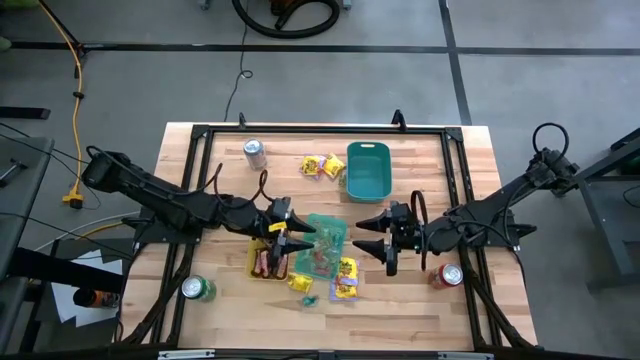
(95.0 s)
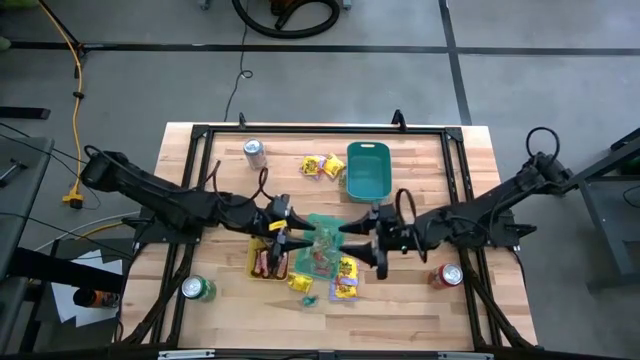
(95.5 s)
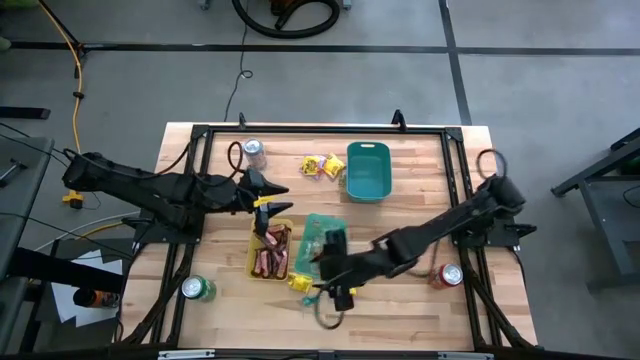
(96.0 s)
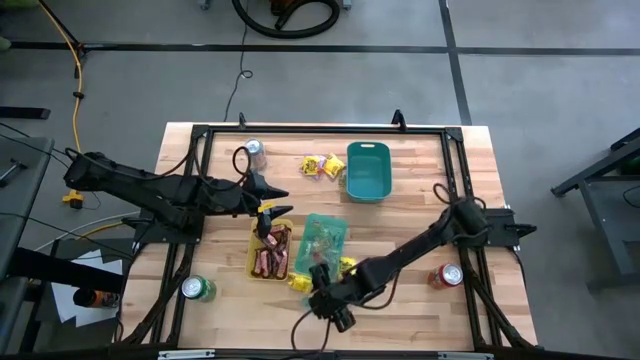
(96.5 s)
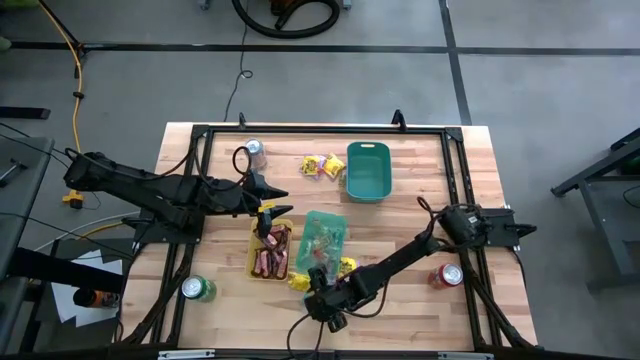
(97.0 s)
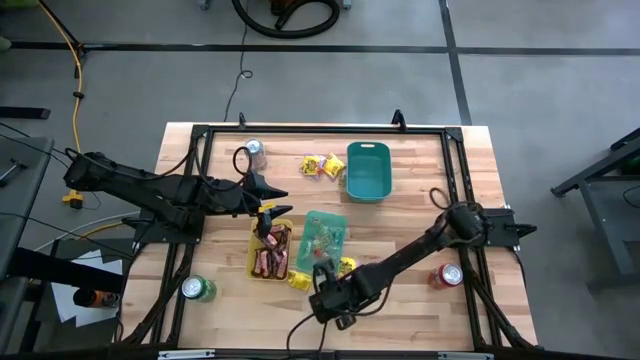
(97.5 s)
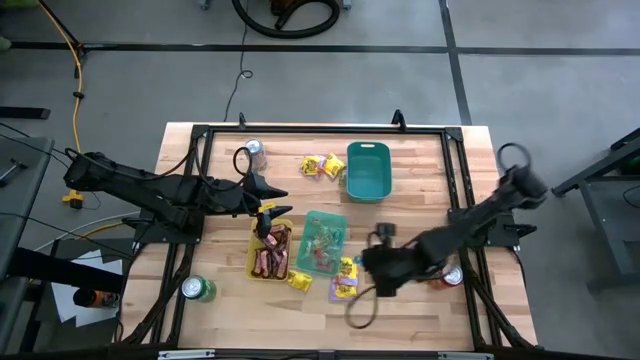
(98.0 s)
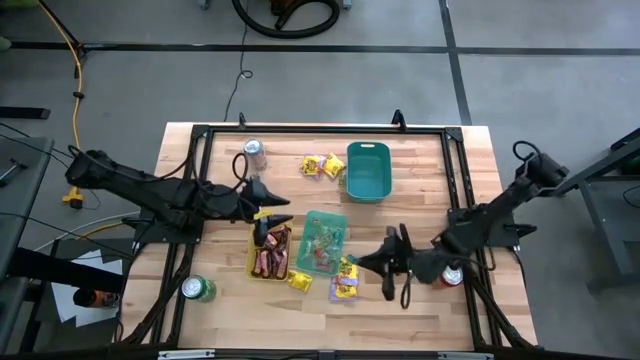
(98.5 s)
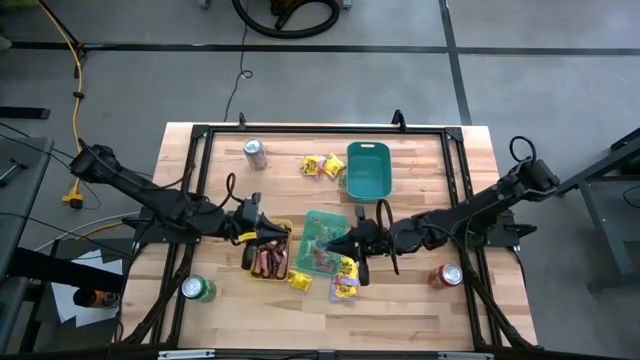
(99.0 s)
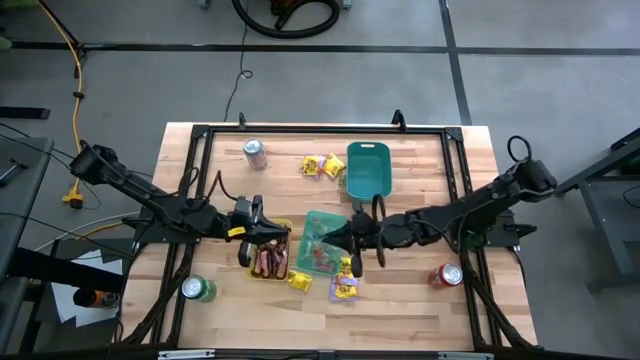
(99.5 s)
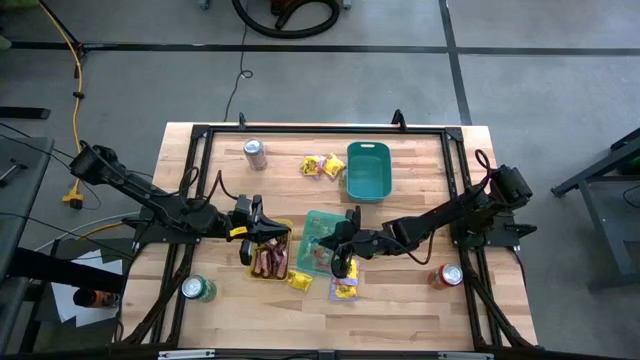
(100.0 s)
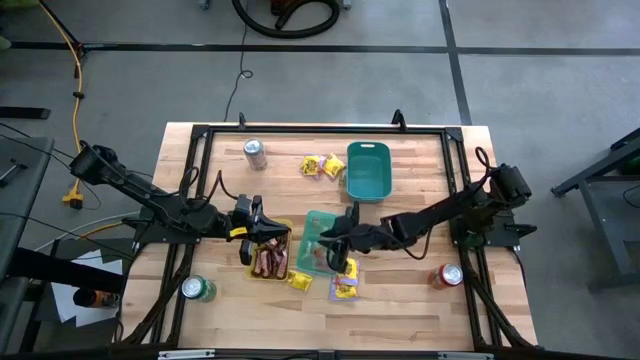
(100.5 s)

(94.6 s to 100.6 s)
Task: Sort candy
Put the blue gummy into the light blue bin

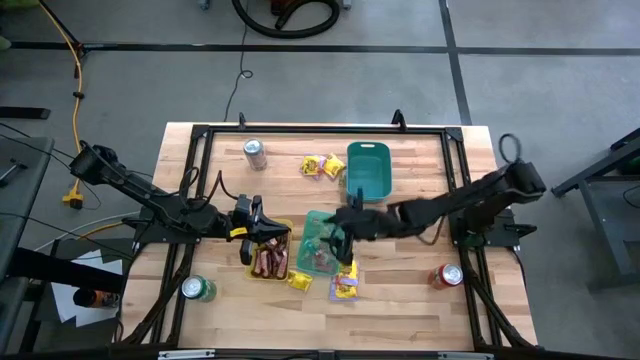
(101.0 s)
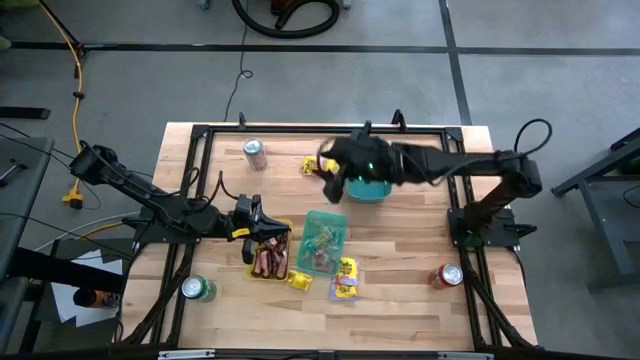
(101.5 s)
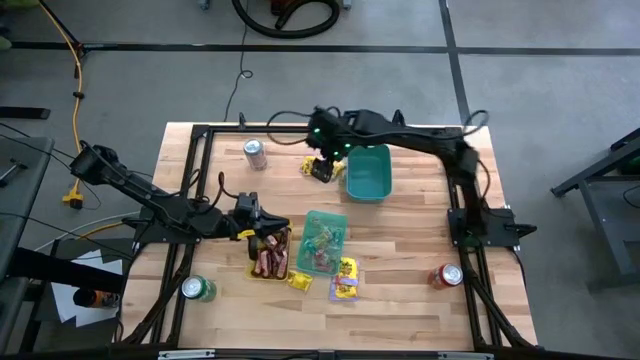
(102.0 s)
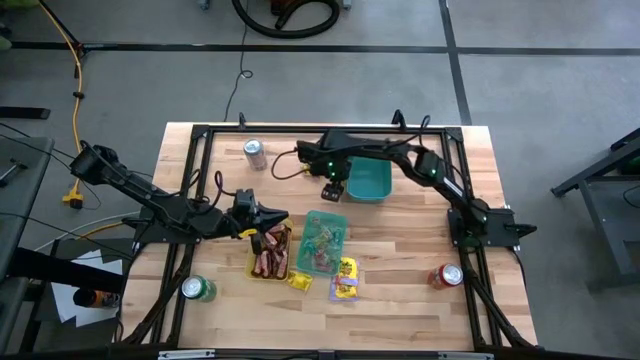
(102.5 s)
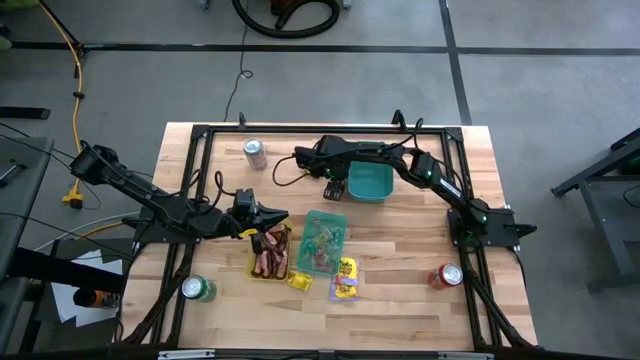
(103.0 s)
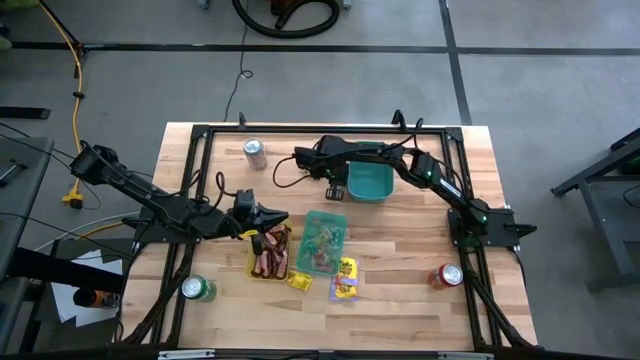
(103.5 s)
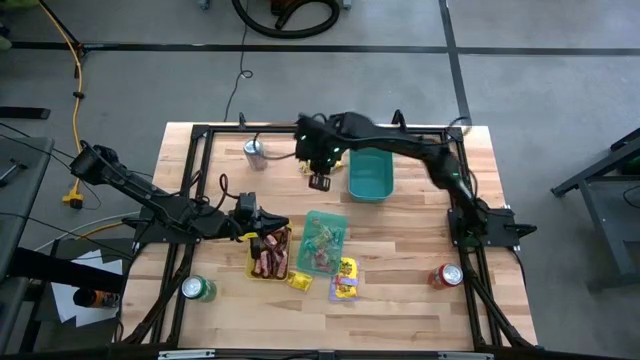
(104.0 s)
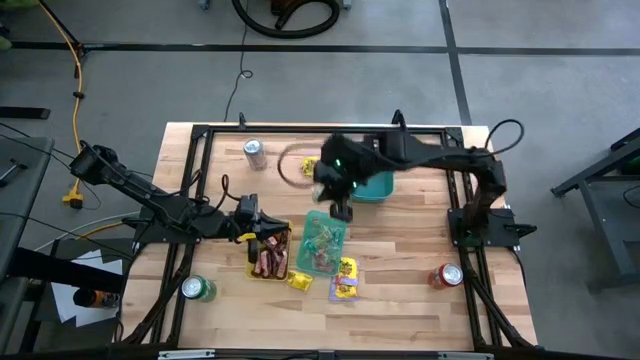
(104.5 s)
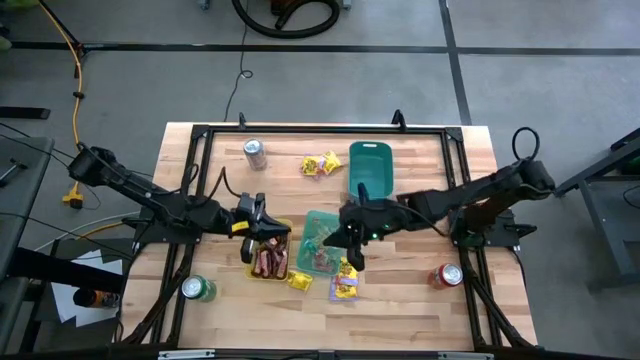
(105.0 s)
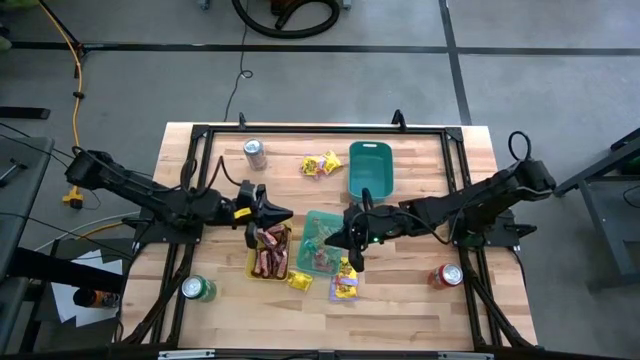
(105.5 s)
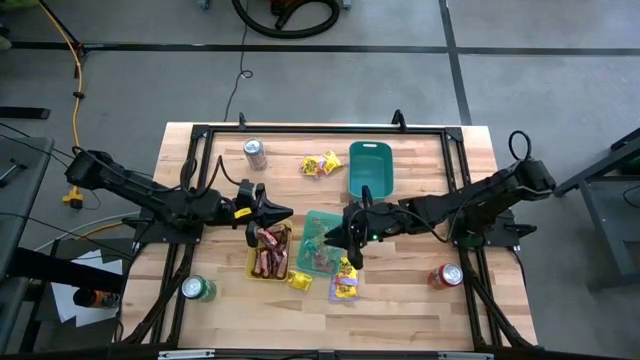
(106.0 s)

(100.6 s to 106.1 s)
Put the green gummy into the light blue bin

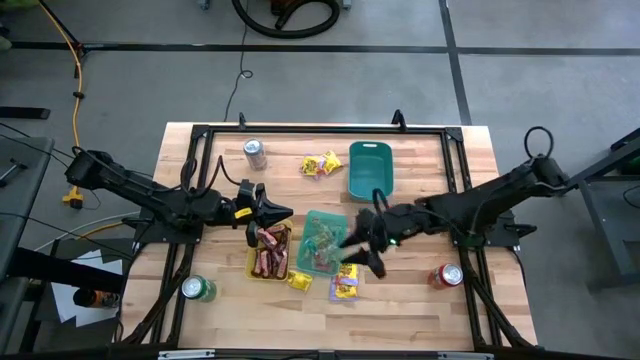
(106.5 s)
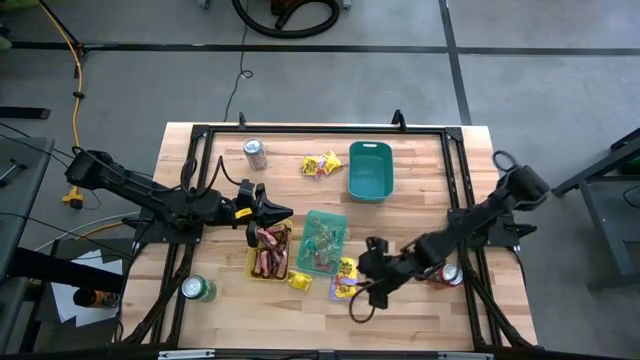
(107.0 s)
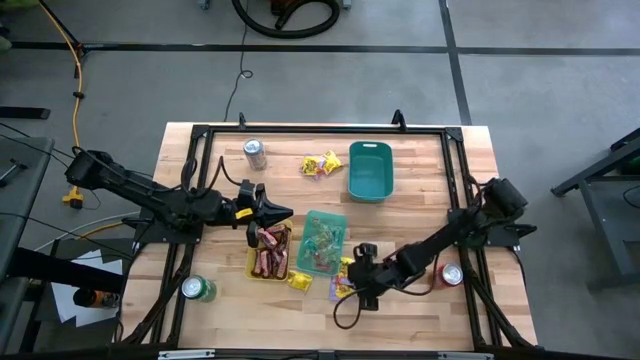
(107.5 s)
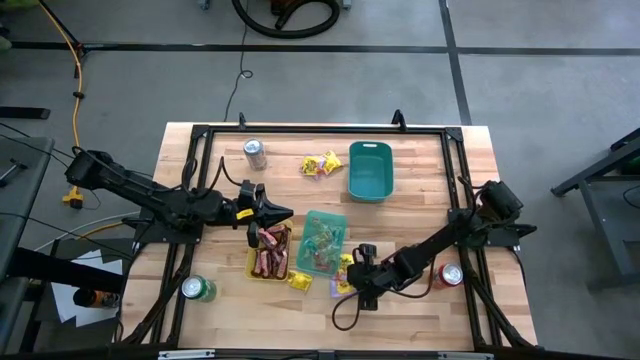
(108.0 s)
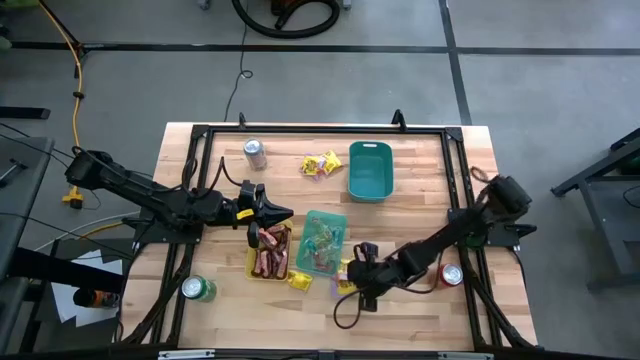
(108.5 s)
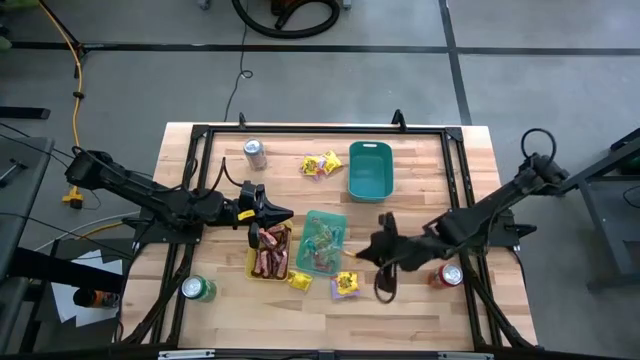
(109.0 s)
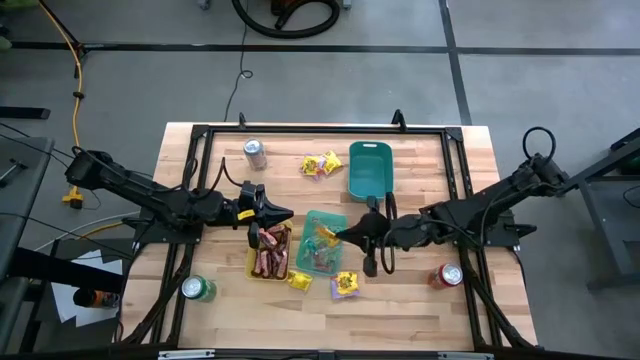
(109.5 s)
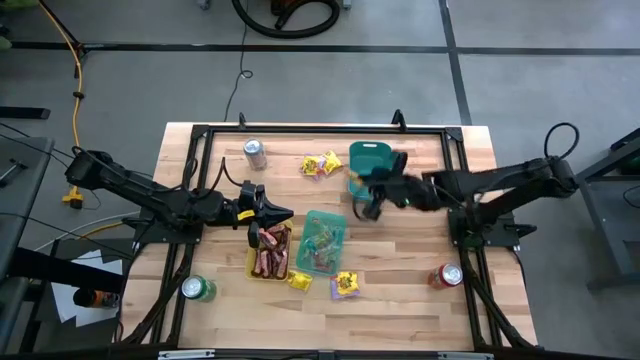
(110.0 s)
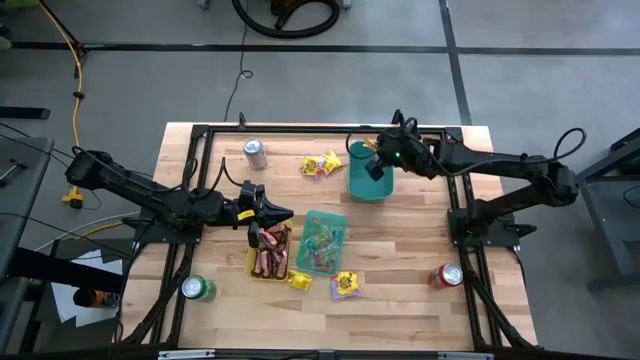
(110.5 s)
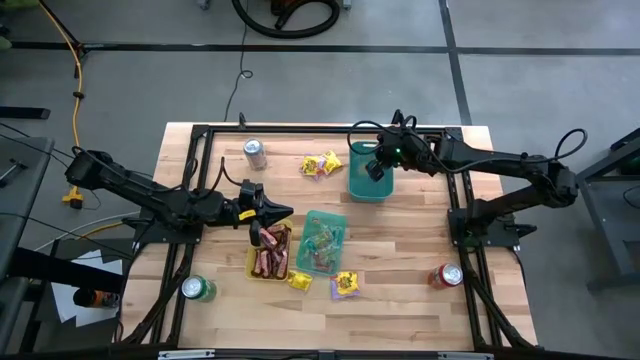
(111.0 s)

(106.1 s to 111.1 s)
Put the yellow candy into the blue bin

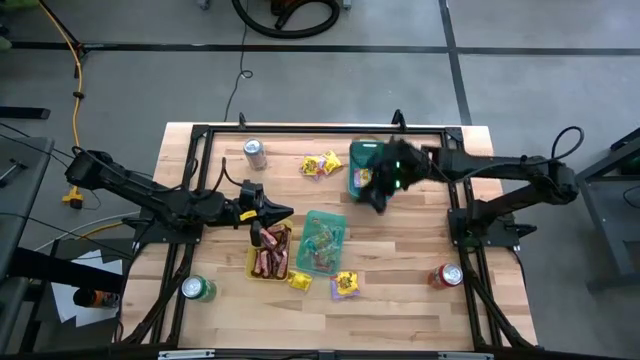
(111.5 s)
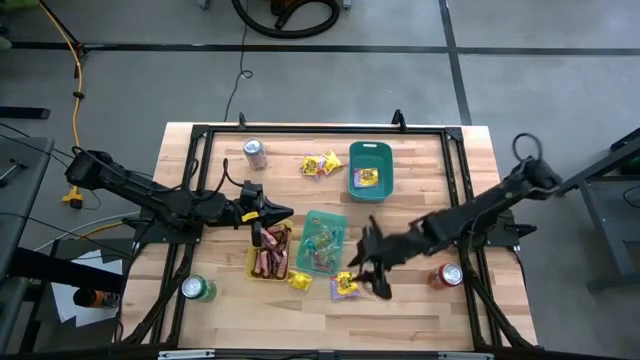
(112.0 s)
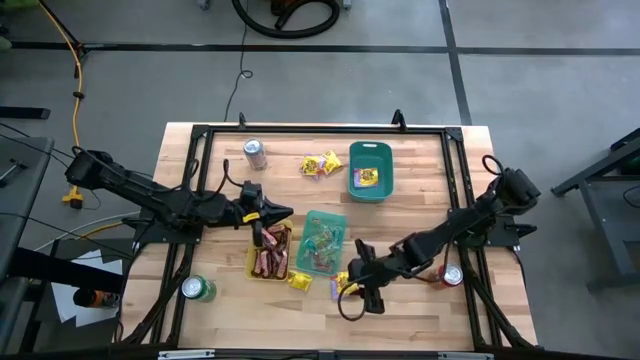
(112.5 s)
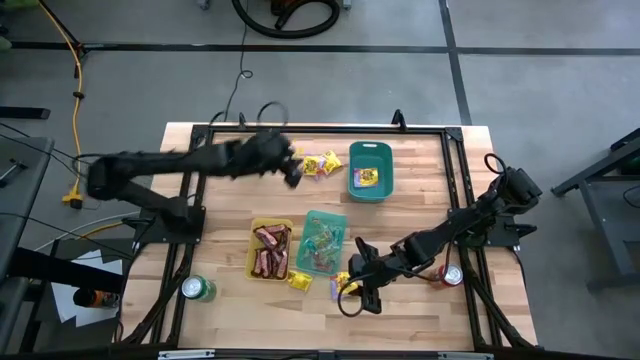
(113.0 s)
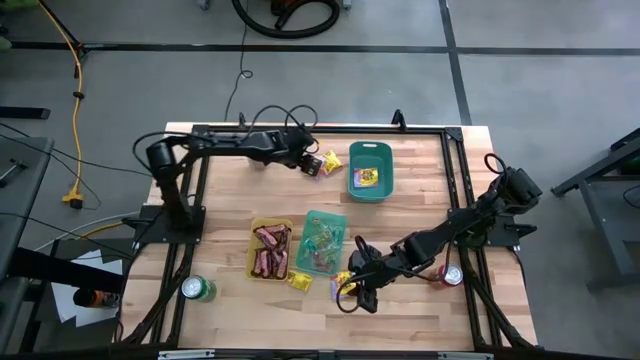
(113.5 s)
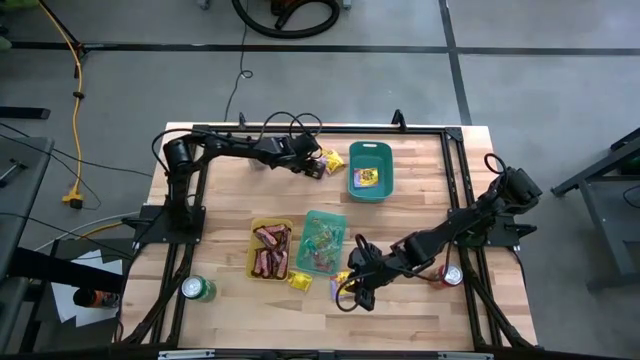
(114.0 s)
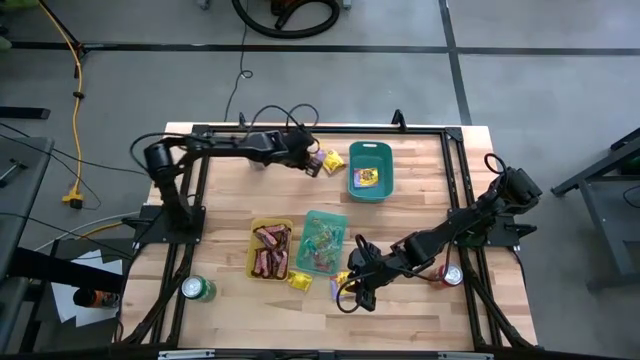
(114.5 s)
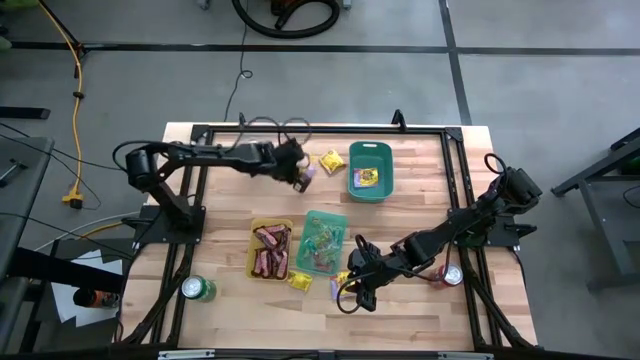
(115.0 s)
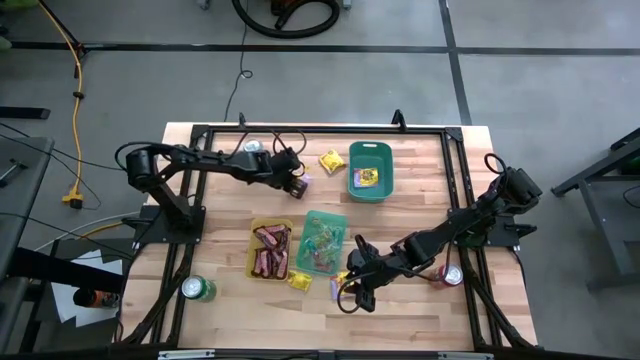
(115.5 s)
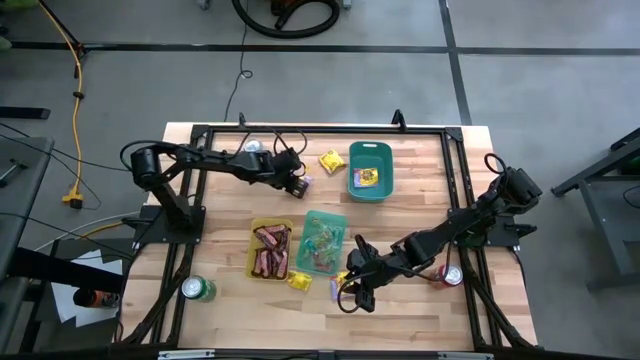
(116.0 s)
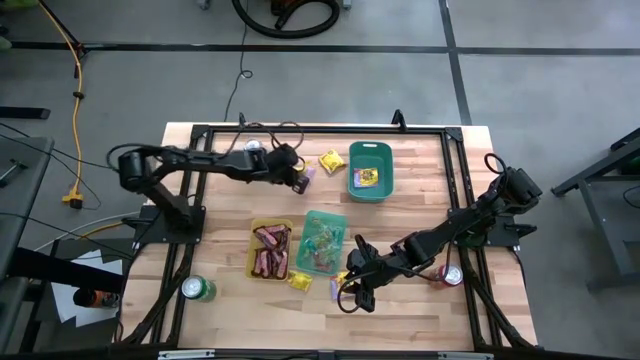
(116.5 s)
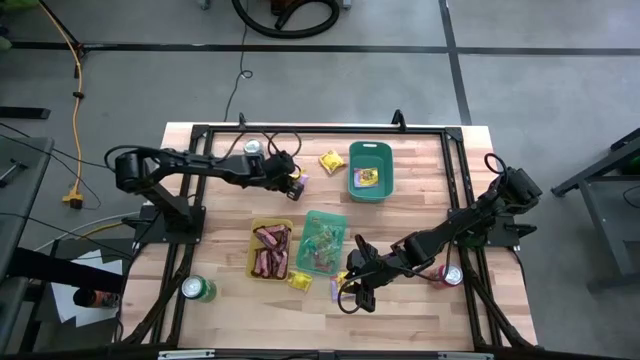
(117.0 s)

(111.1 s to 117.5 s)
Put the yellow candy into the blue bin
